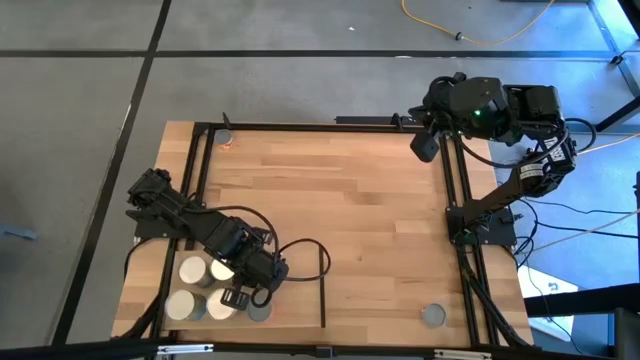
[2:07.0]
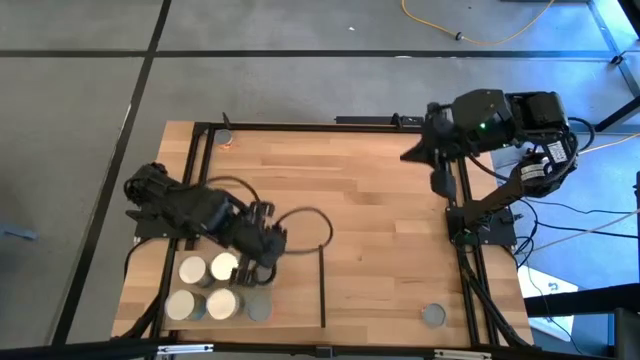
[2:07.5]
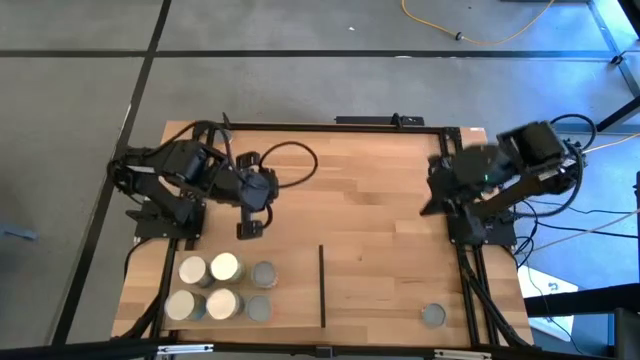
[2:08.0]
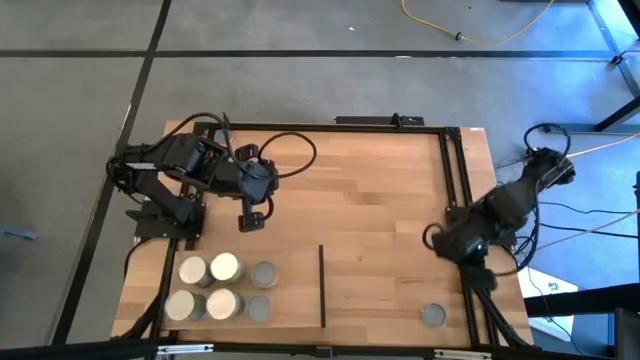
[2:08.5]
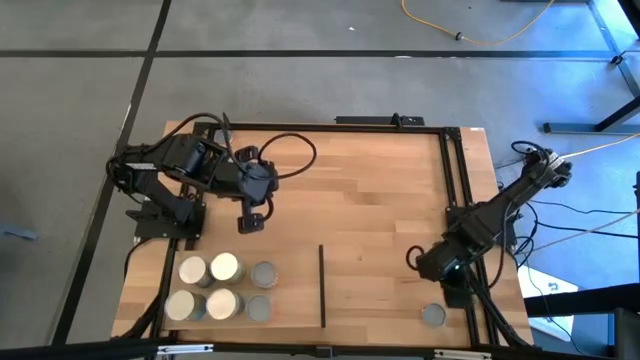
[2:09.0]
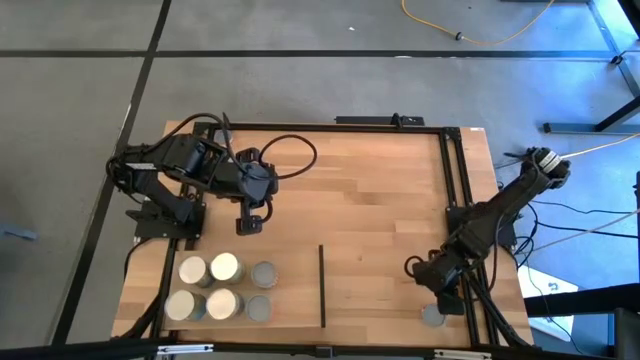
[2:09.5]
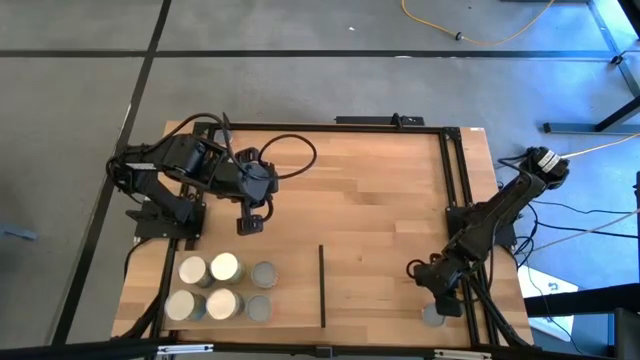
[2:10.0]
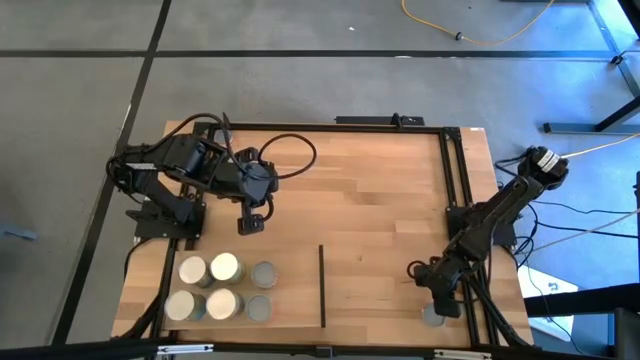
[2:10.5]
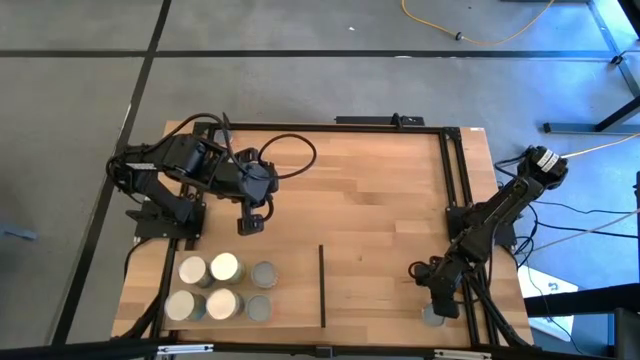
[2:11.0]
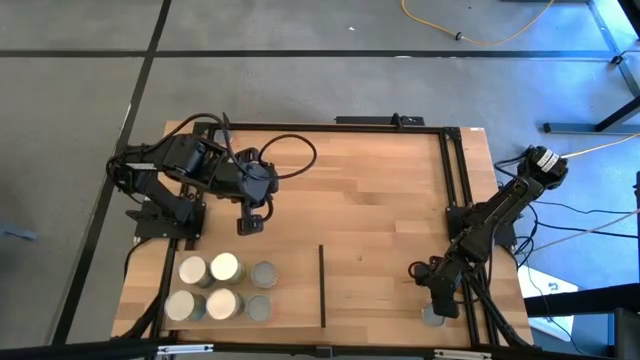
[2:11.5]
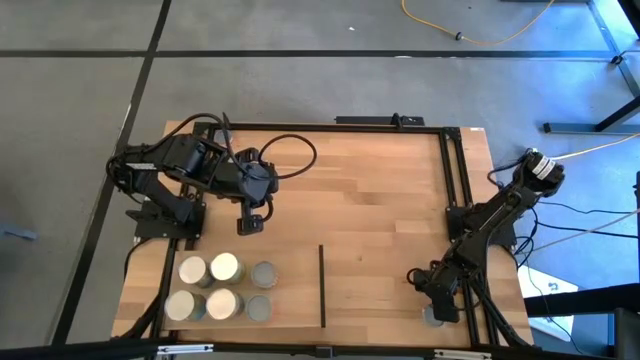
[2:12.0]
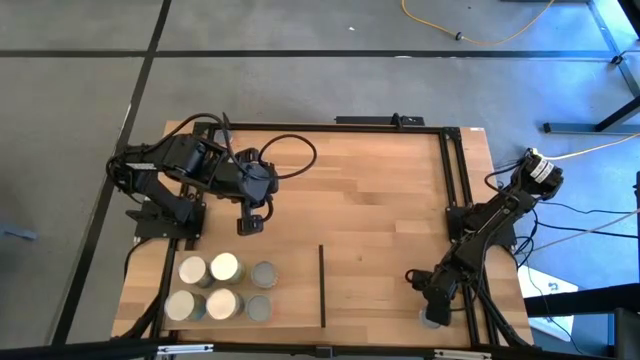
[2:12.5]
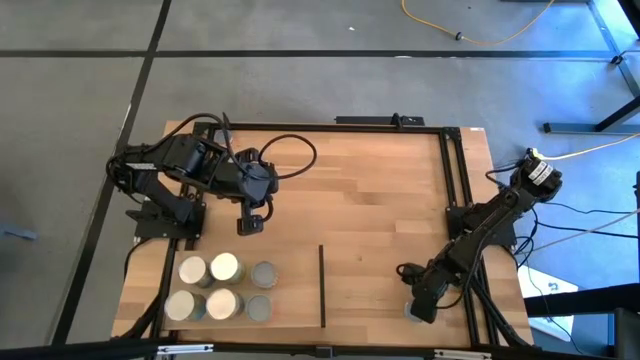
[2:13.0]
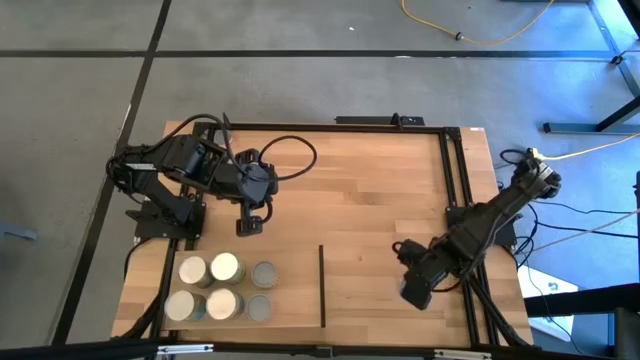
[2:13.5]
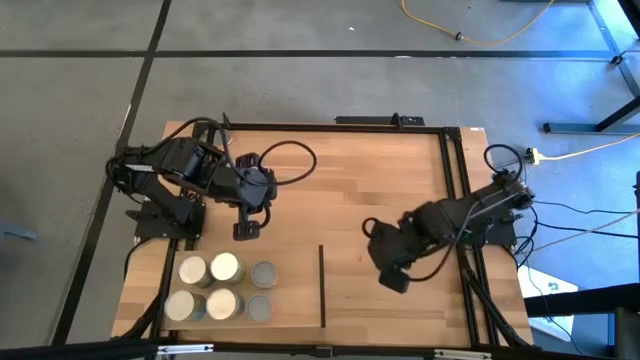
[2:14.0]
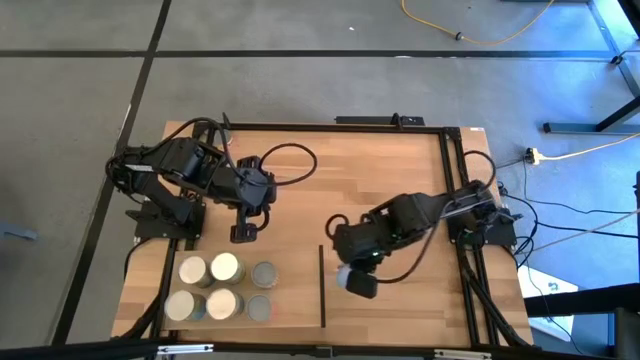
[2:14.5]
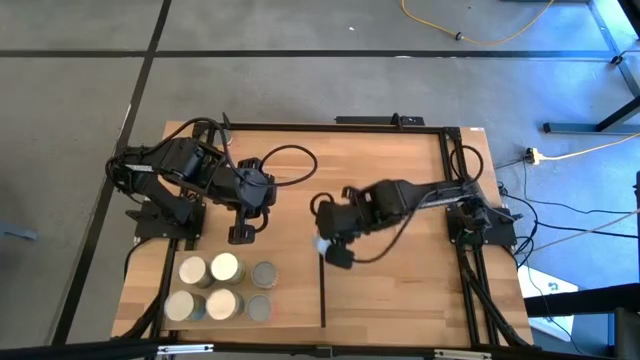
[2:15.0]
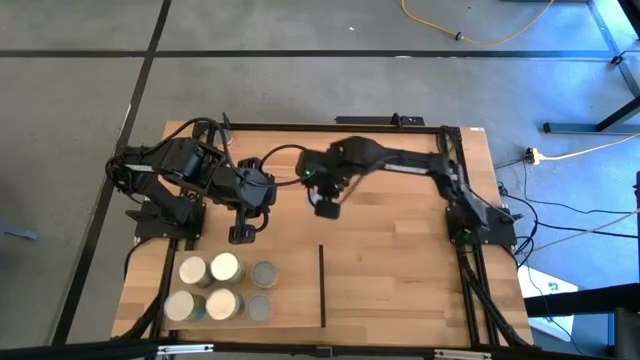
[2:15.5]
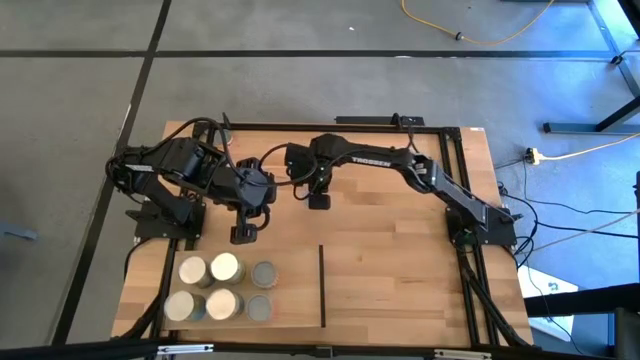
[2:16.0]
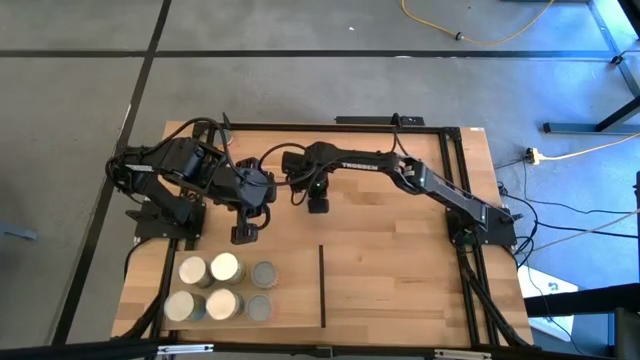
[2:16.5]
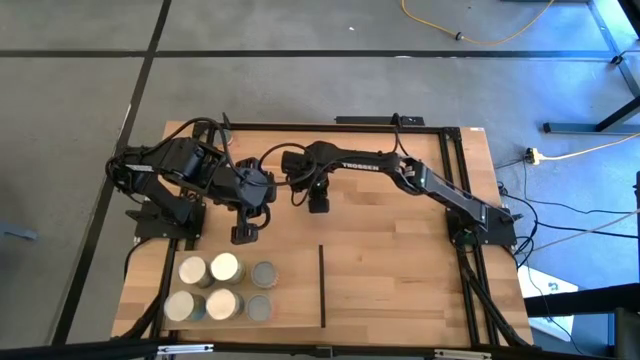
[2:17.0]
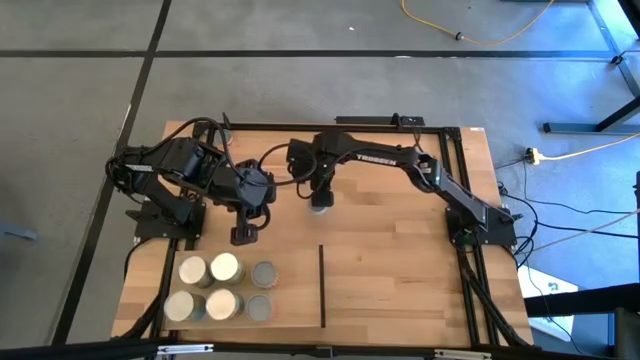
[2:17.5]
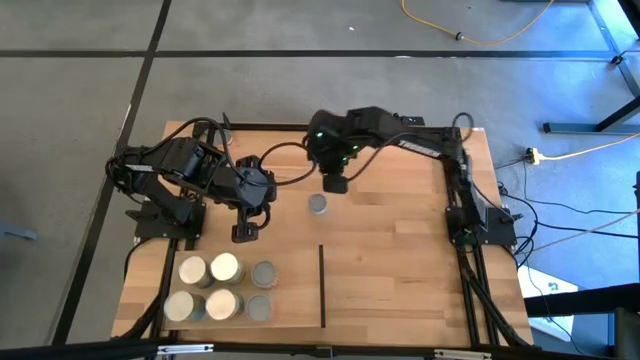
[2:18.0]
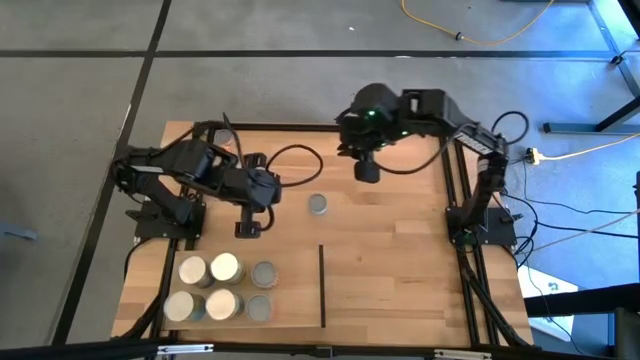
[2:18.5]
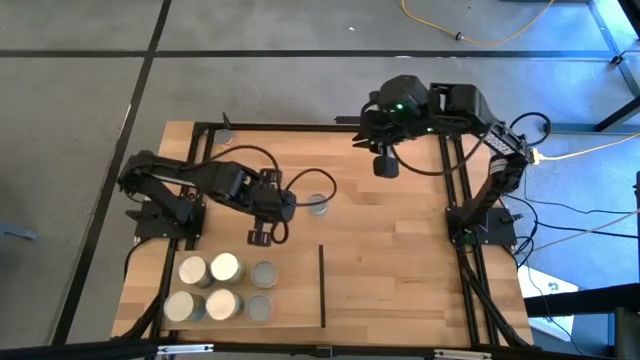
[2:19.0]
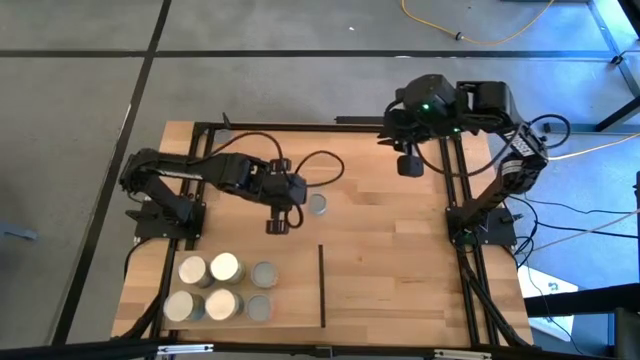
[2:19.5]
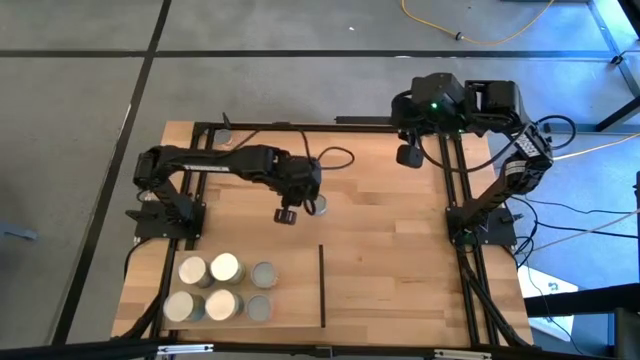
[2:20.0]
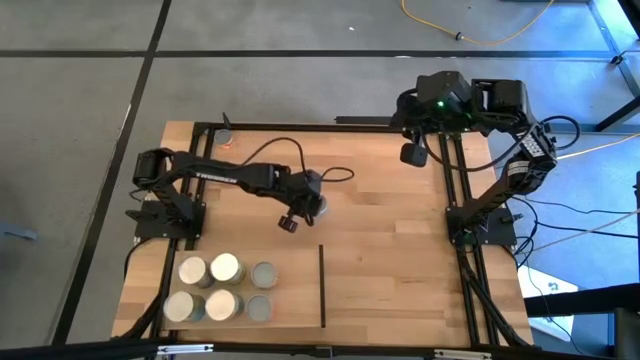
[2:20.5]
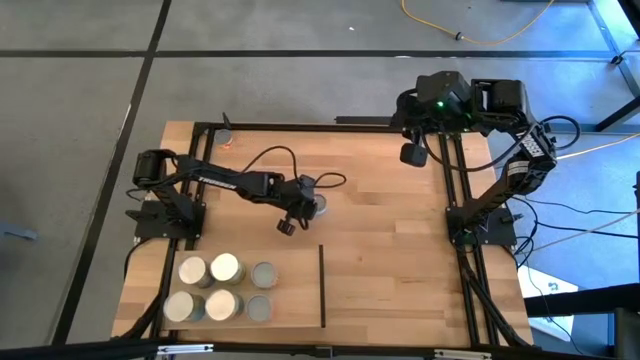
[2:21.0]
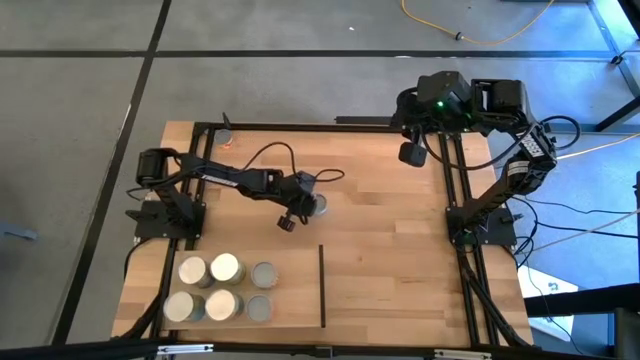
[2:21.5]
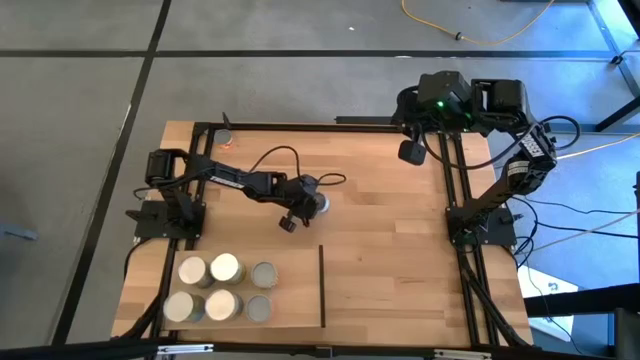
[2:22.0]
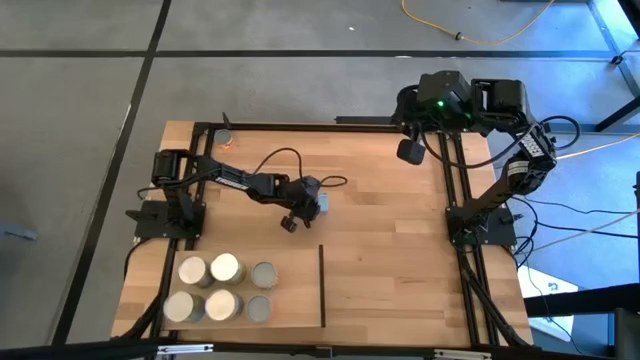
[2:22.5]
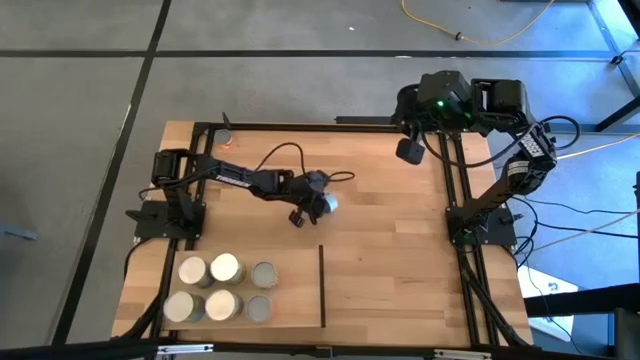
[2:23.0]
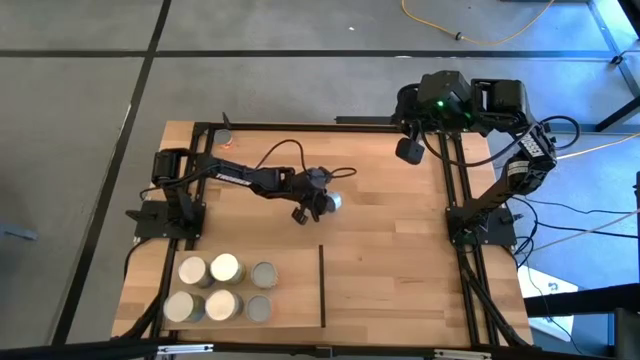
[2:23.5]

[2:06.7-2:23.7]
Task: Pick and place cans onto a shelf
Put the canned salmon on the shelf

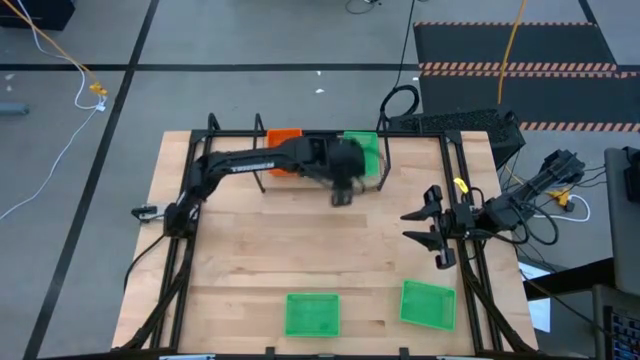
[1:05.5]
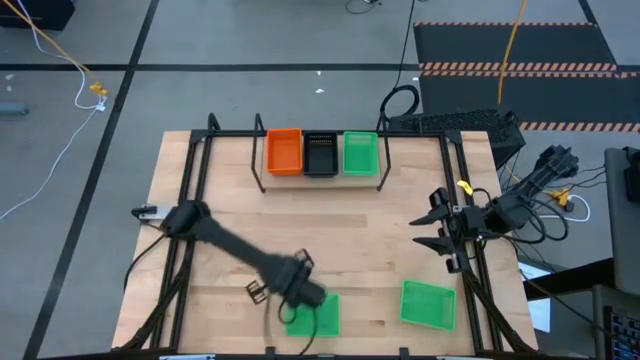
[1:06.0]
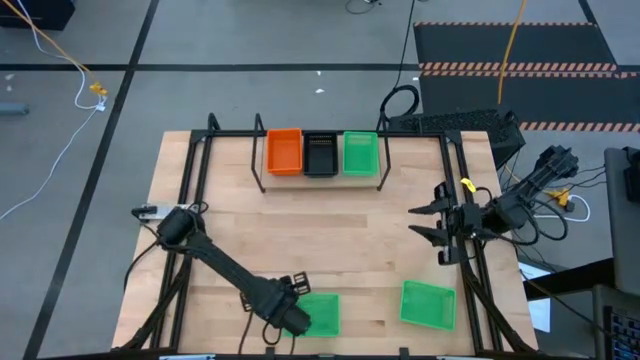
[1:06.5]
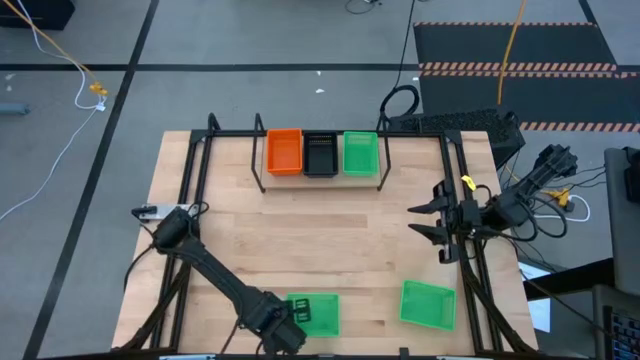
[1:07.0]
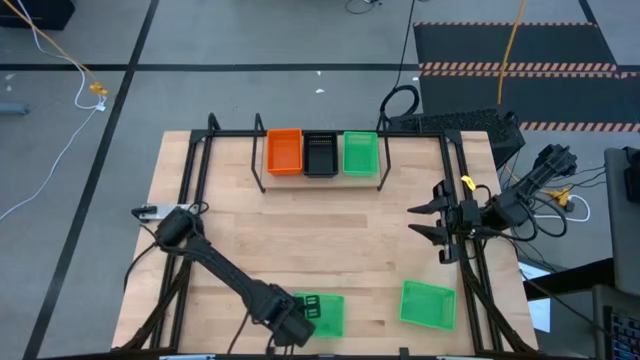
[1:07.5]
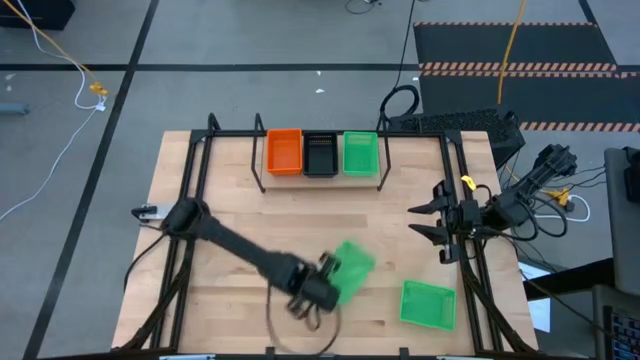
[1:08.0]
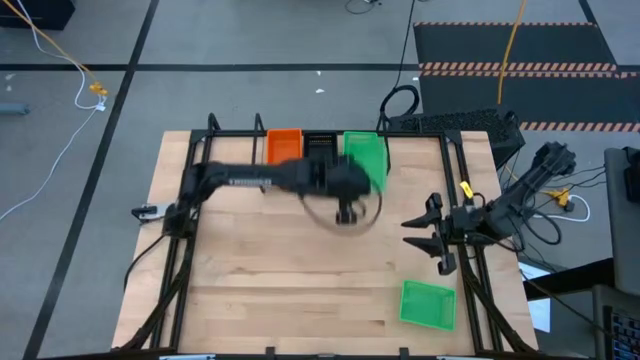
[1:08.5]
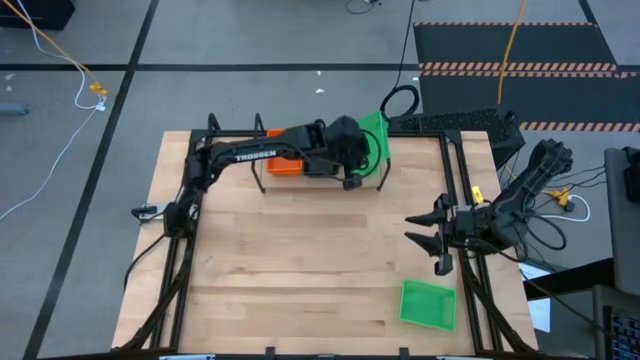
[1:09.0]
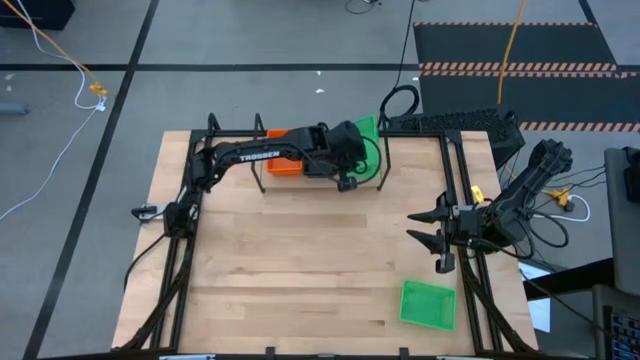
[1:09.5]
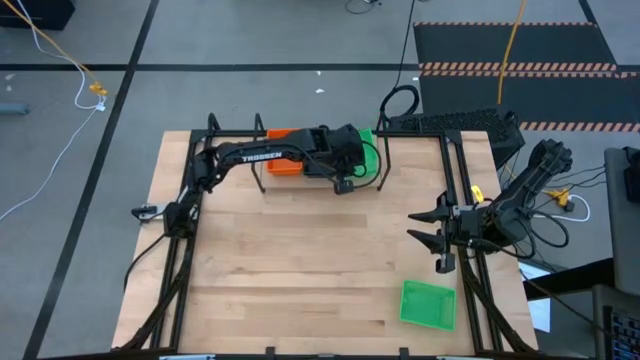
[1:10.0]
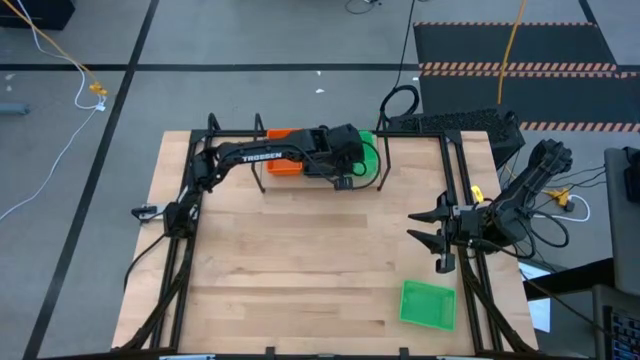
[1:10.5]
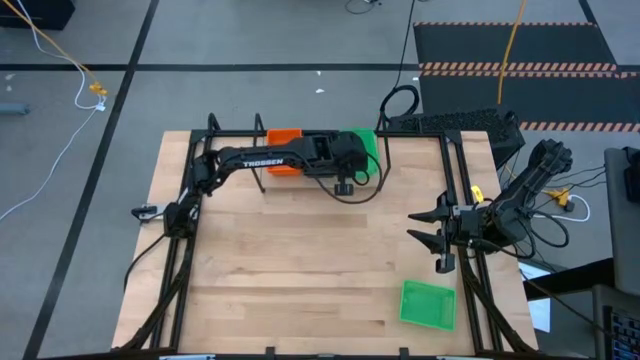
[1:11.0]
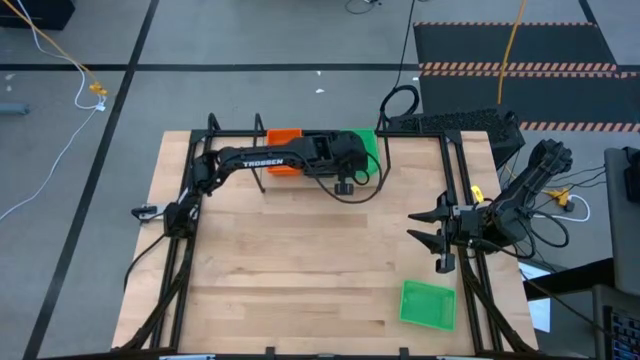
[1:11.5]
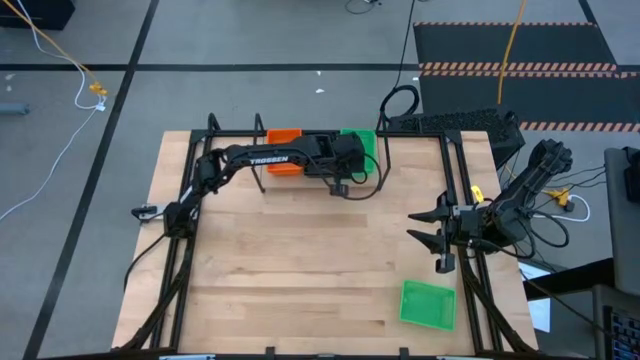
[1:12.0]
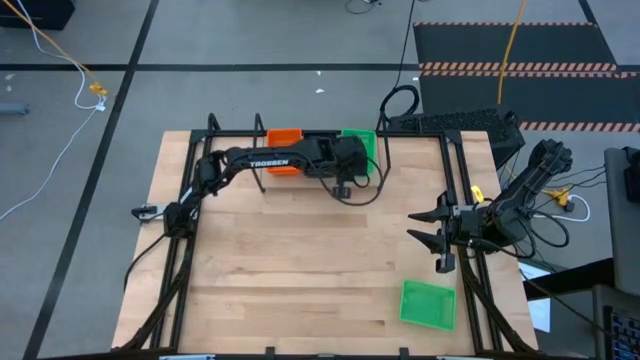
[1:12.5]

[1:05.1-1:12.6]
Task: Stack baskets on shelf by color
Stack the left green basket on top of the green basket on the shelf
